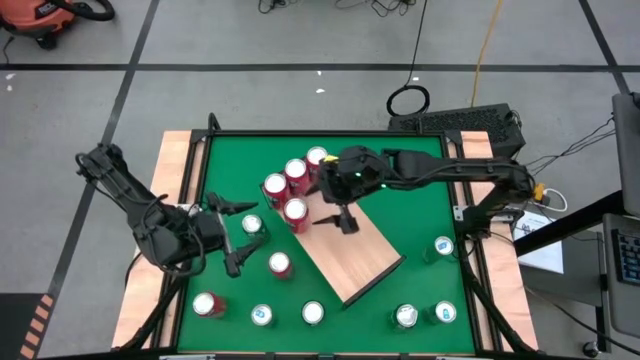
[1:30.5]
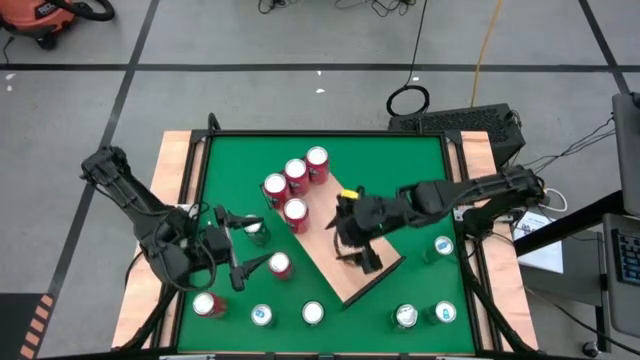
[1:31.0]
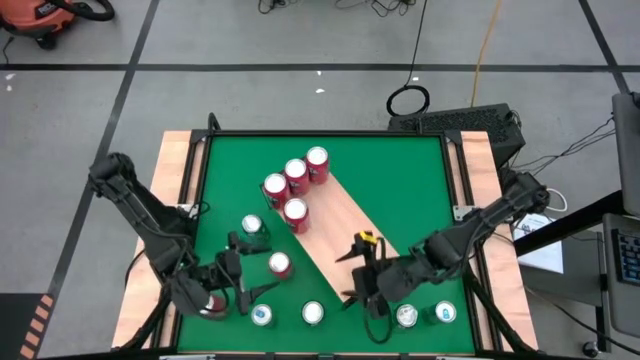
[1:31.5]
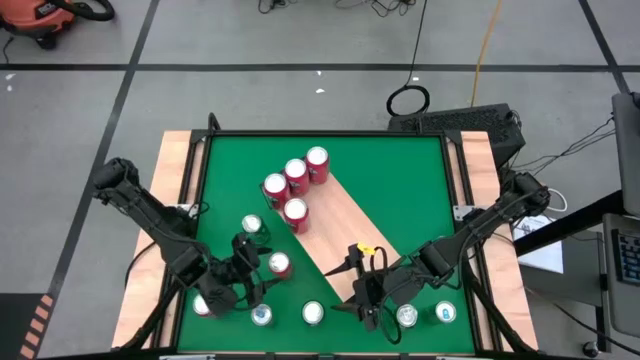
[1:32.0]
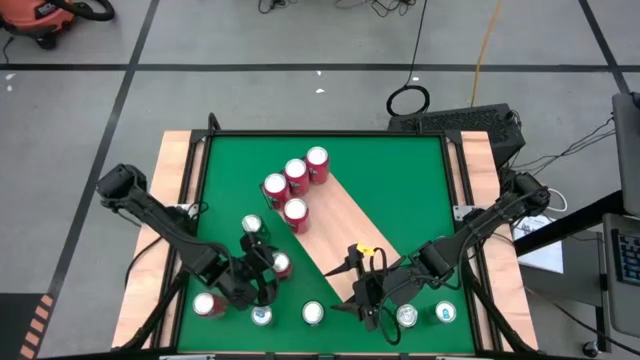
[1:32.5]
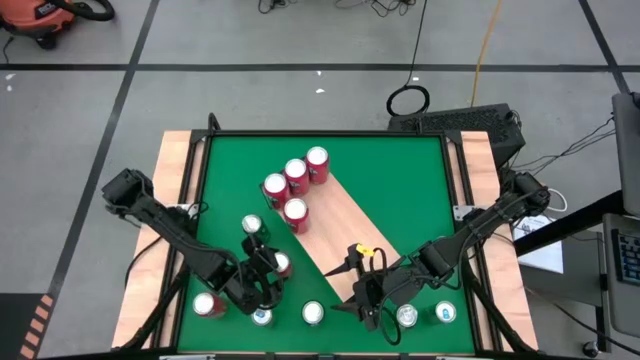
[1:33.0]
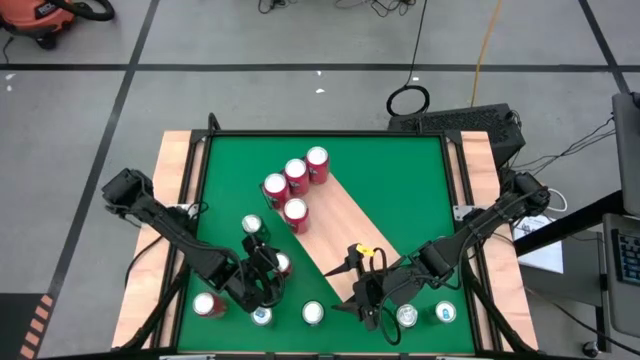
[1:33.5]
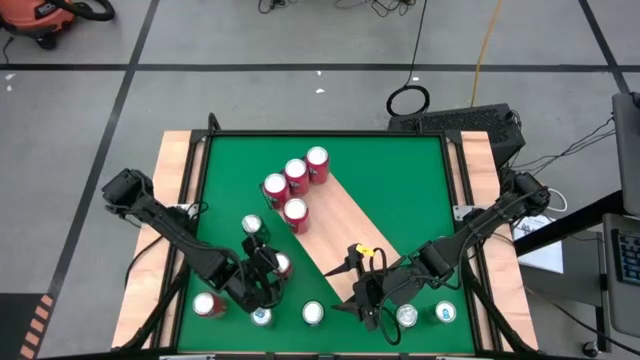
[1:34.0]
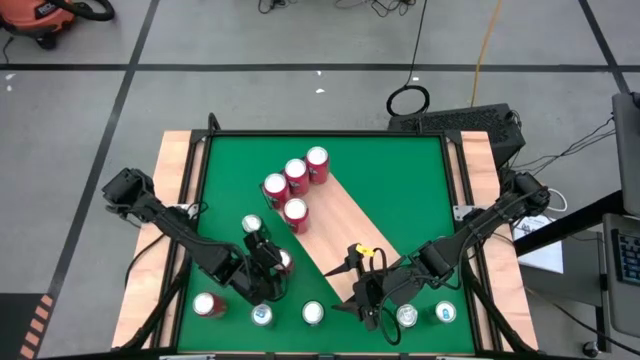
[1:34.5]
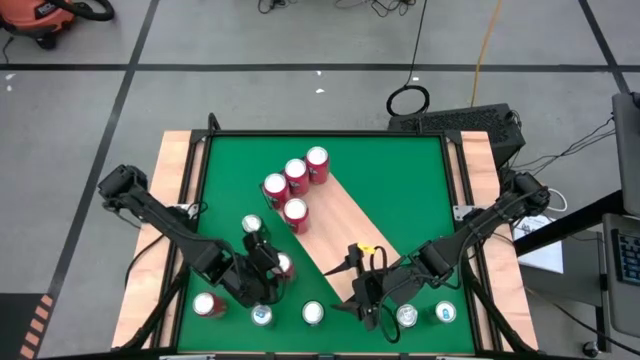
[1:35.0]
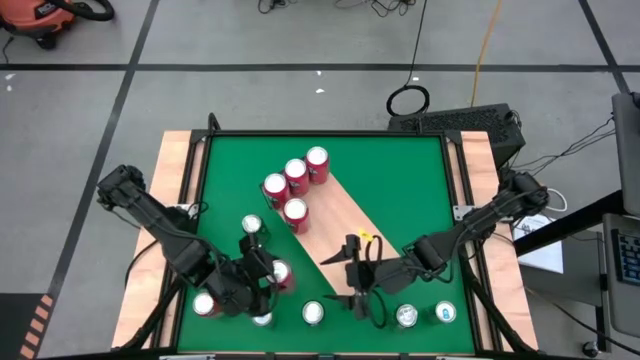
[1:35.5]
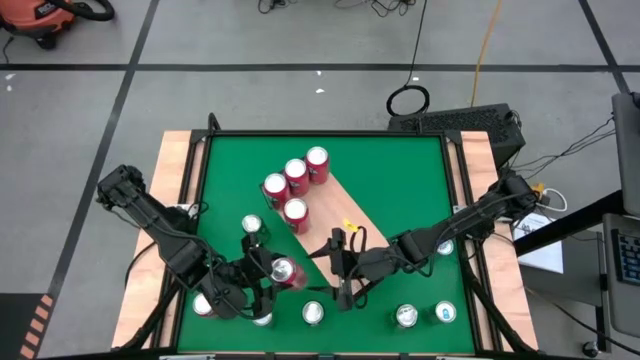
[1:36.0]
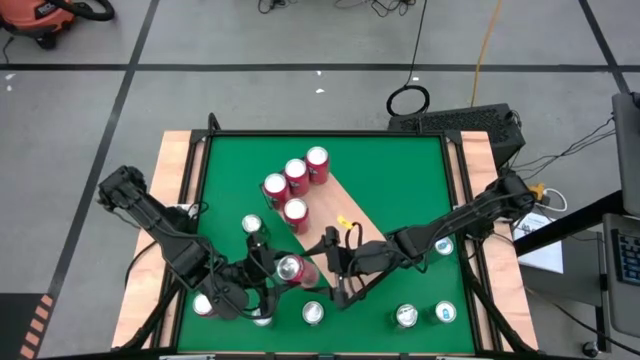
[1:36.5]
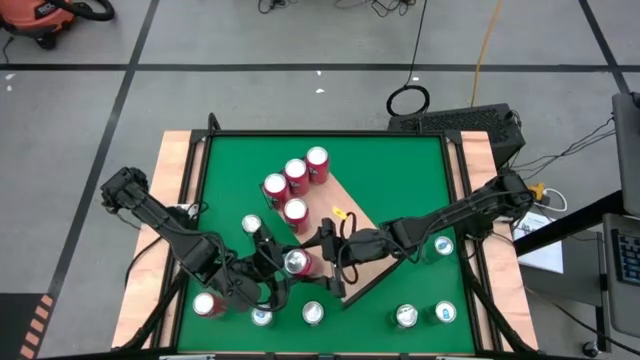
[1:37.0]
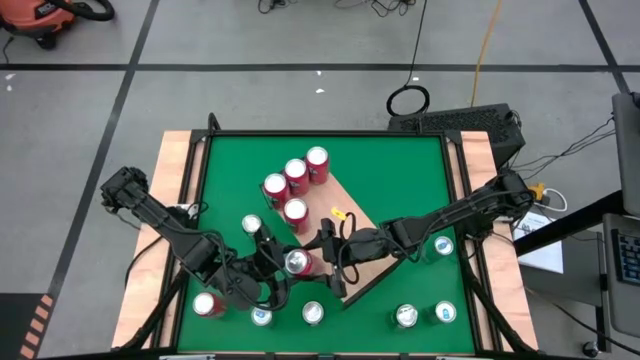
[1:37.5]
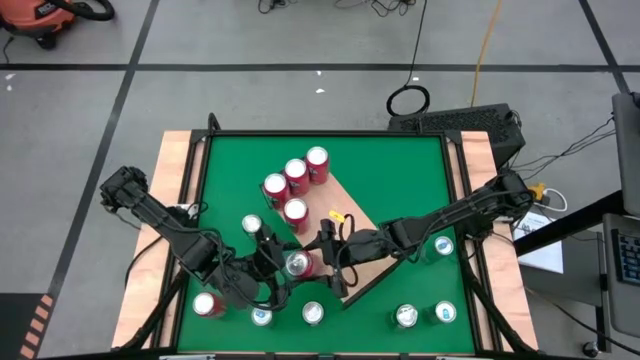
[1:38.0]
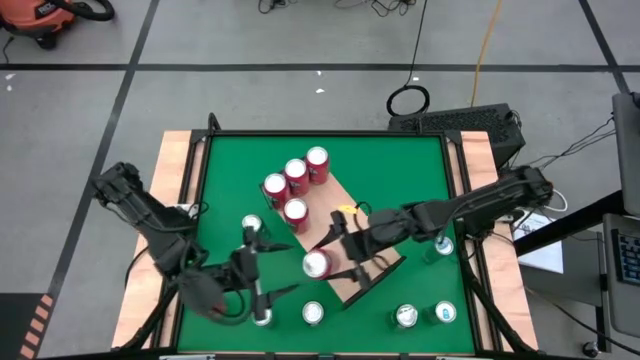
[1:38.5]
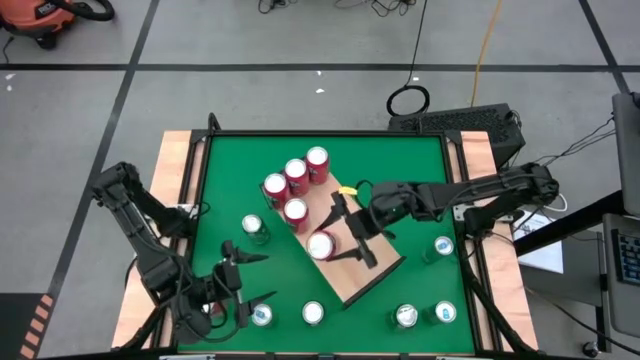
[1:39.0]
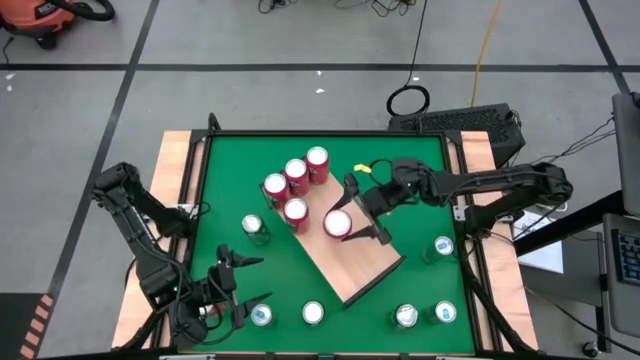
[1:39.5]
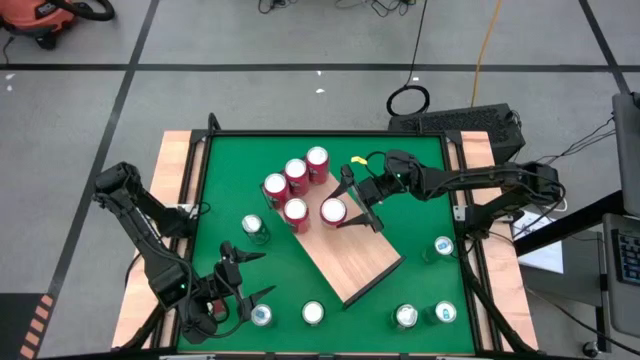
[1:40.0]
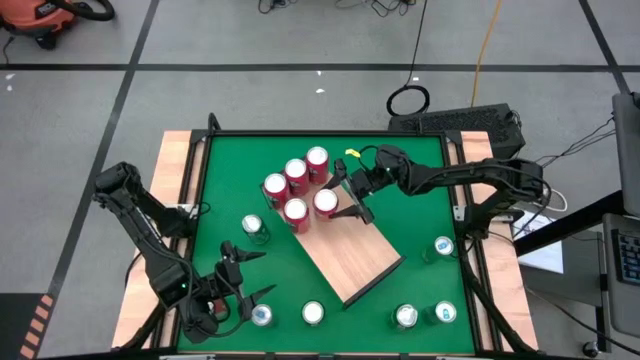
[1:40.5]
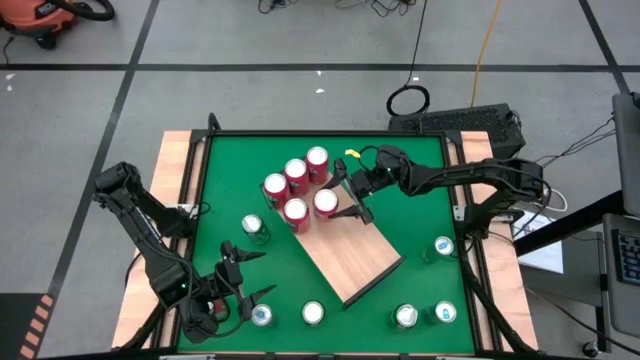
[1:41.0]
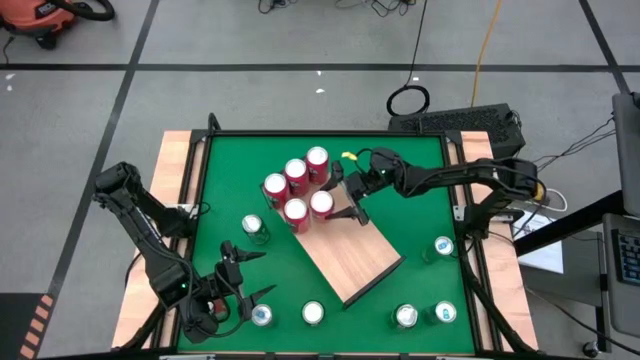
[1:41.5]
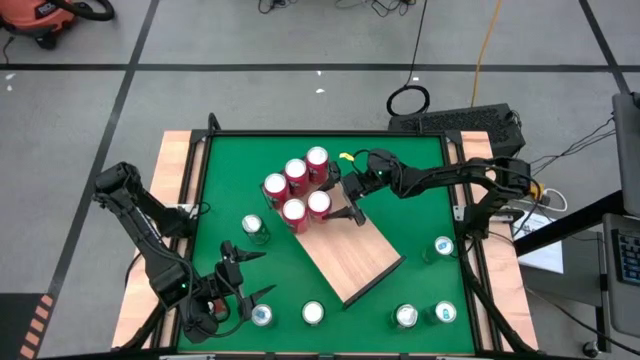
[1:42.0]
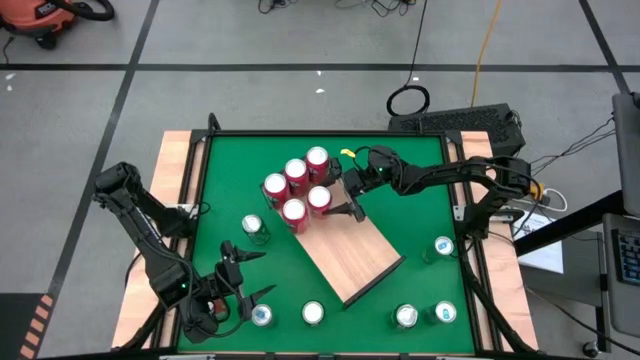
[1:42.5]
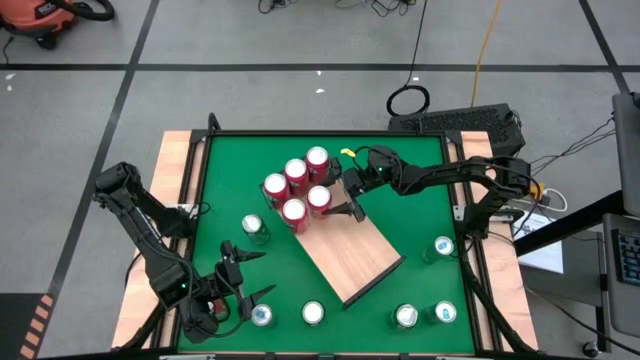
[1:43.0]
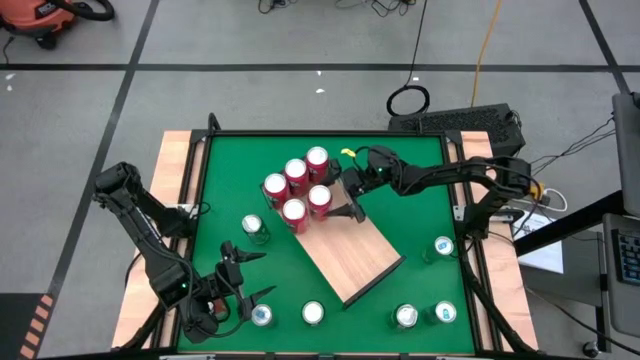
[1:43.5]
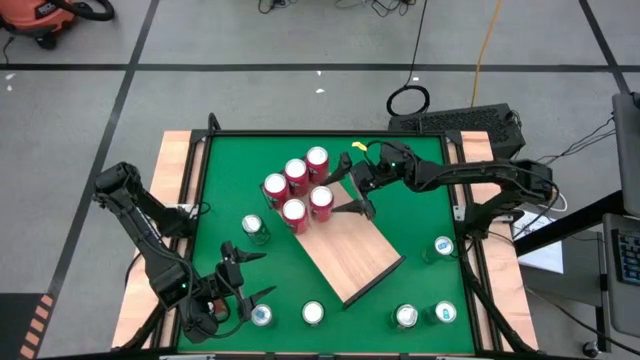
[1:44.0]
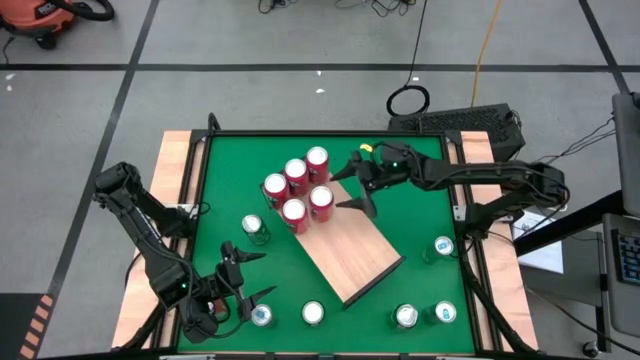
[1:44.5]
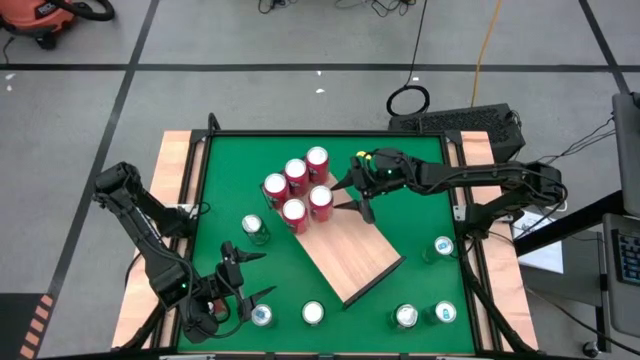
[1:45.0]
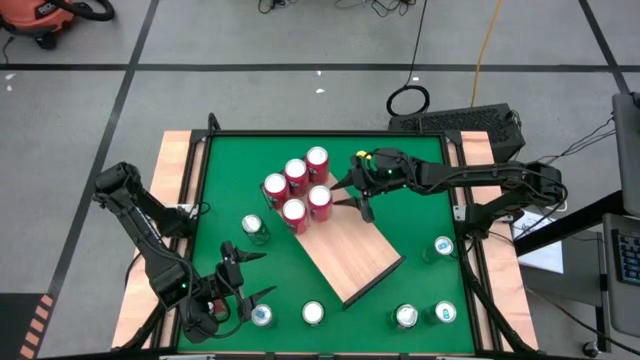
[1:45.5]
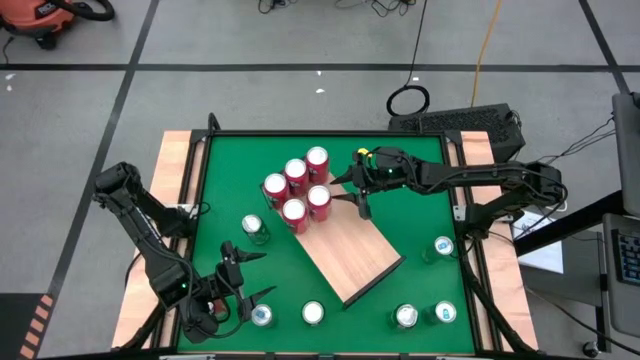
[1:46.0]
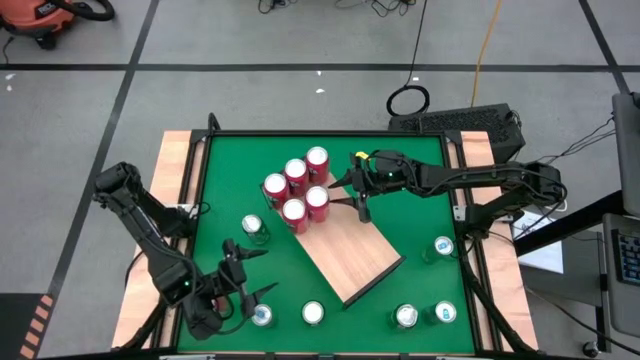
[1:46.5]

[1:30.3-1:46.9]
Task: Place canned beverage on shelf
Put the red soda can on the shelf aligned with the other red soda can

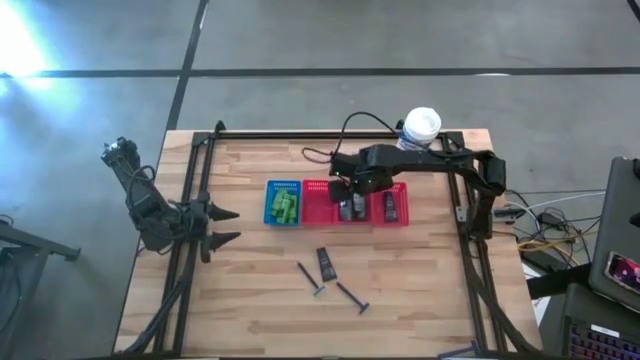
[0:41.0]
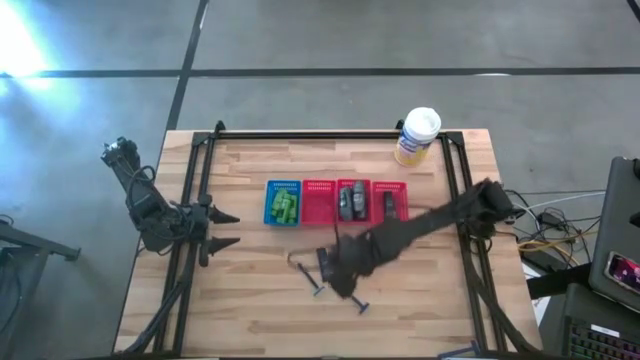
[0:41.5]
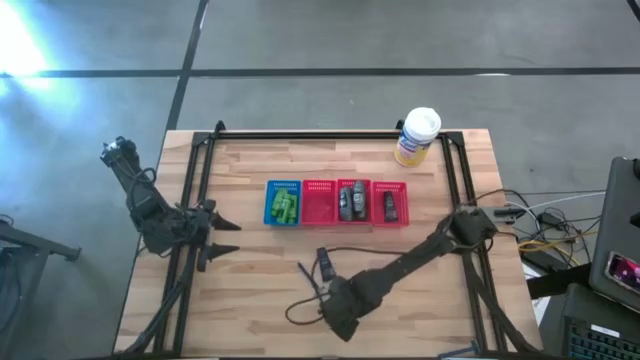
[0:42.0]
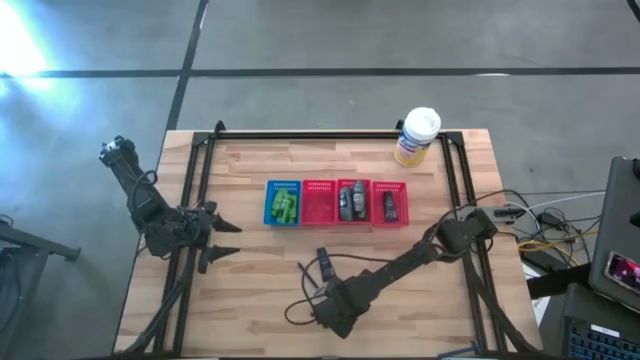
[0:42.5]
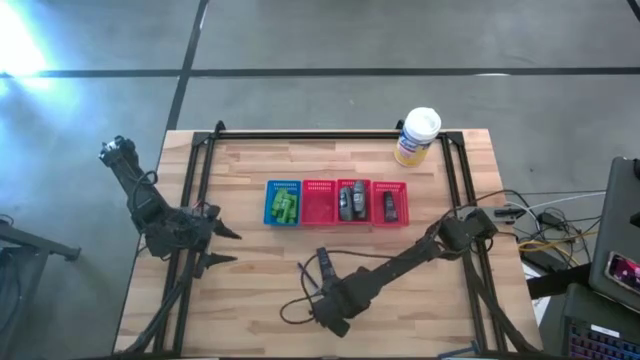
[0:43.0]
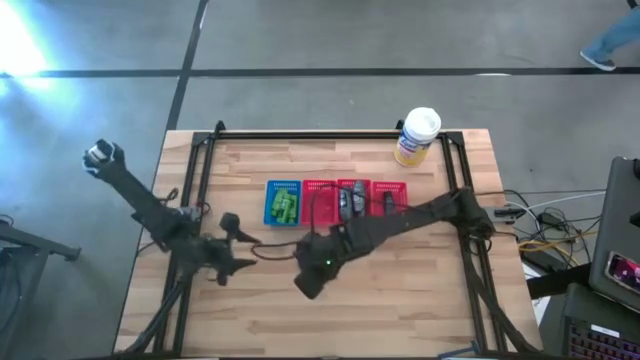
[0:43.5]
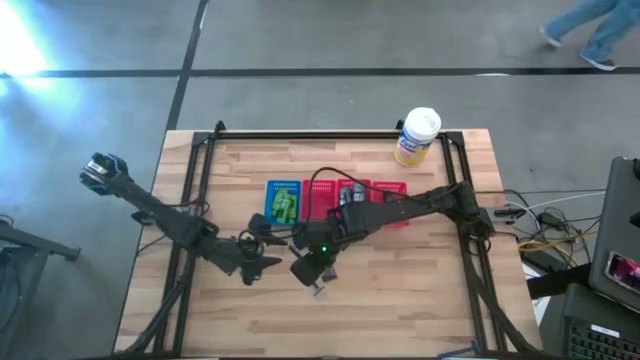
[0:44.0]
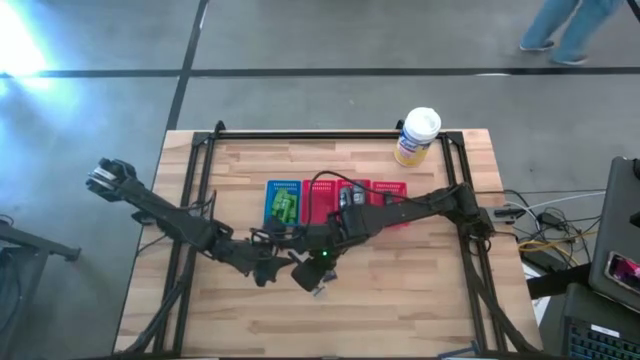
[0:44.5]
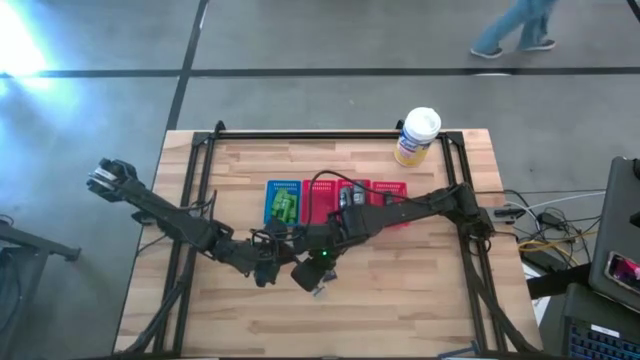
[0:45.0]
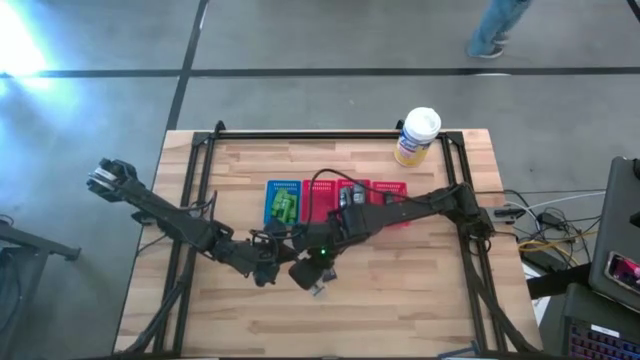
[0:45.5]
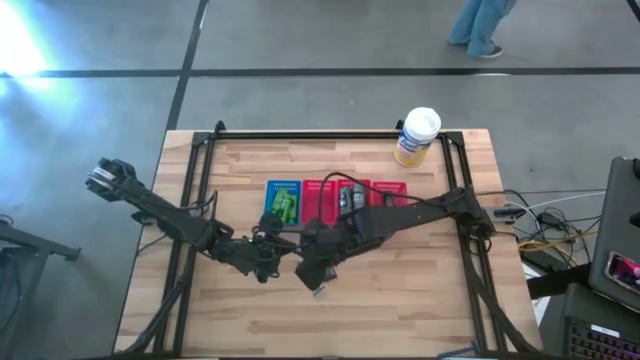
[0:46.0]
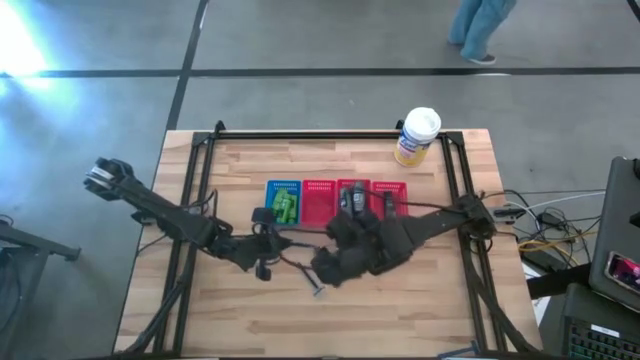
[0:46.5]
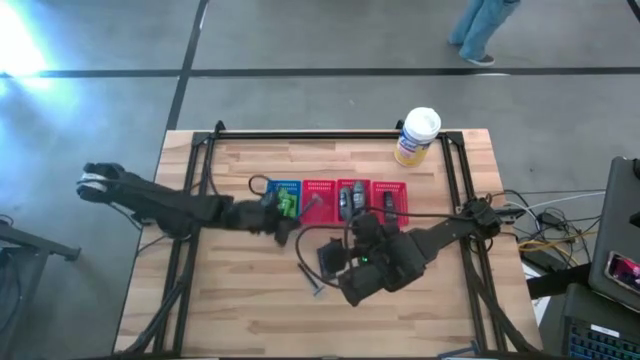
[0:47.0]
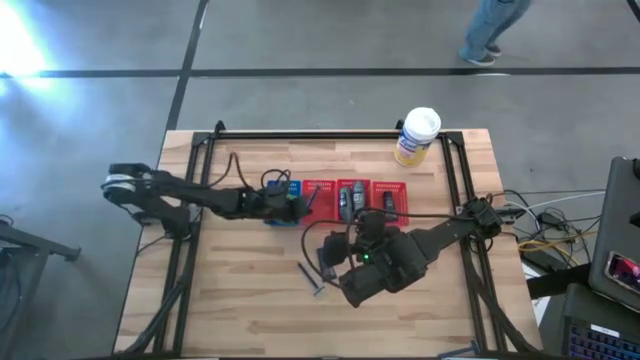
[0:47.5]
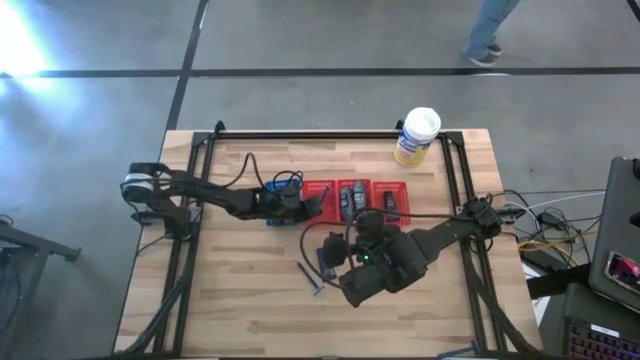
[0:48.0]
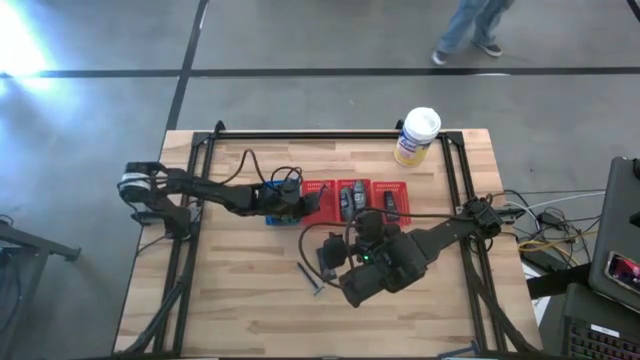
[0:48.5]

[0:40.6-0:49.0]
Task: Pick & Place Travel size toiletries
Put the blue razor into the left red bin
